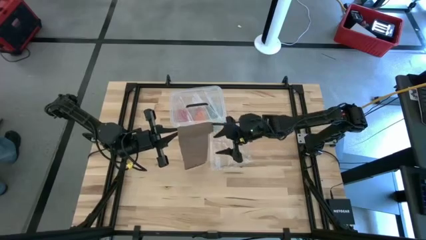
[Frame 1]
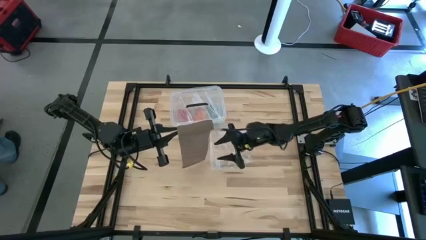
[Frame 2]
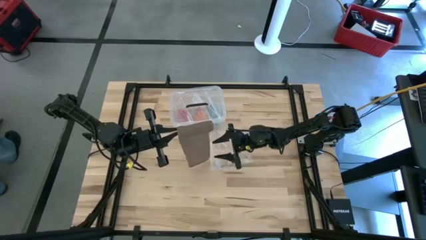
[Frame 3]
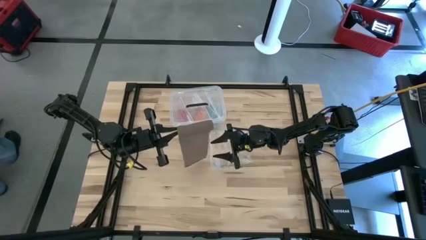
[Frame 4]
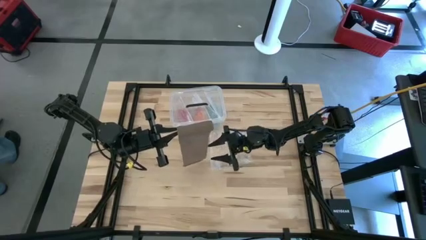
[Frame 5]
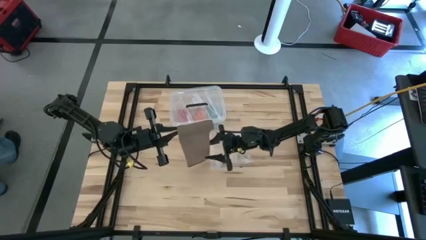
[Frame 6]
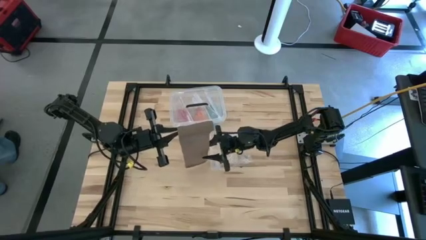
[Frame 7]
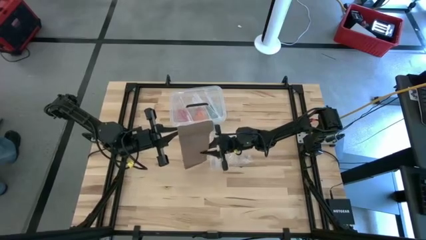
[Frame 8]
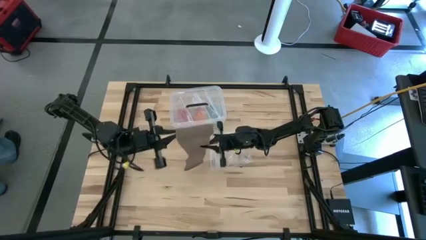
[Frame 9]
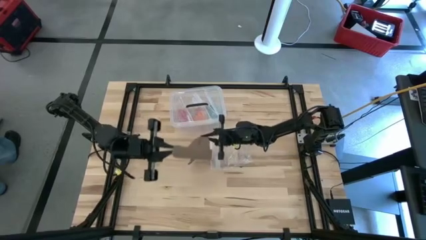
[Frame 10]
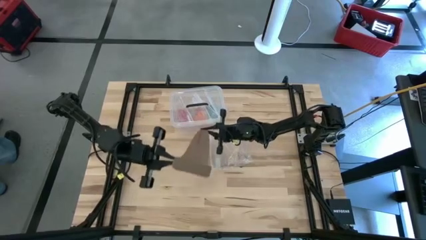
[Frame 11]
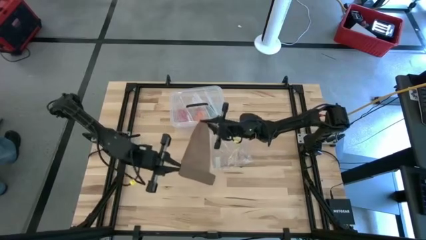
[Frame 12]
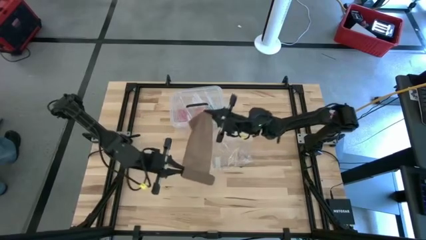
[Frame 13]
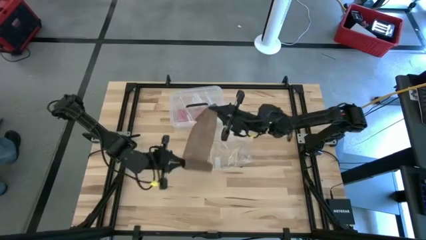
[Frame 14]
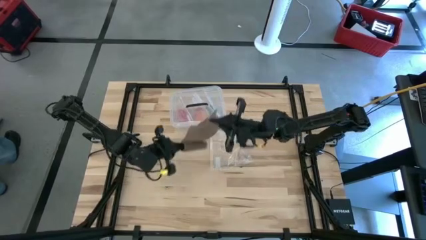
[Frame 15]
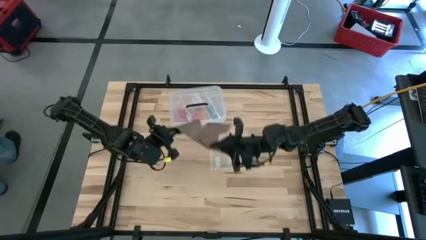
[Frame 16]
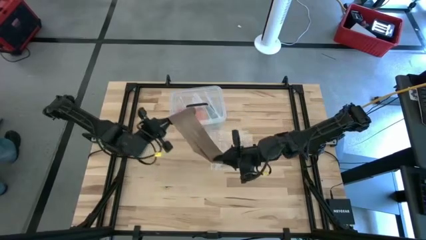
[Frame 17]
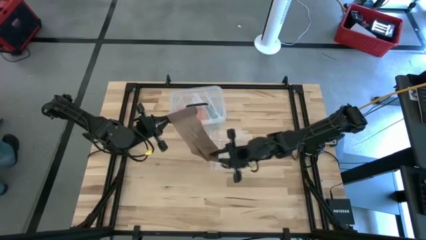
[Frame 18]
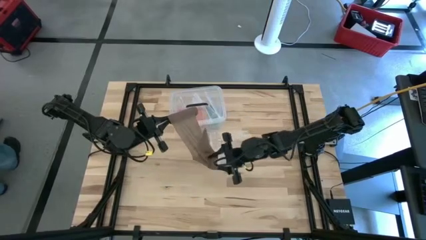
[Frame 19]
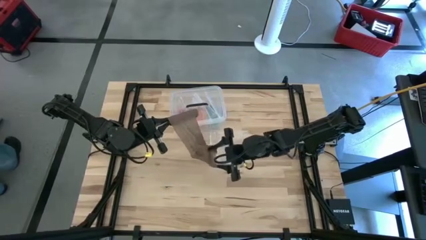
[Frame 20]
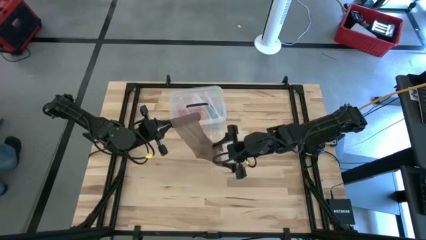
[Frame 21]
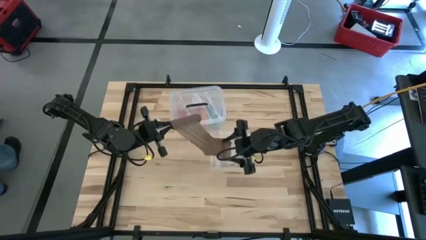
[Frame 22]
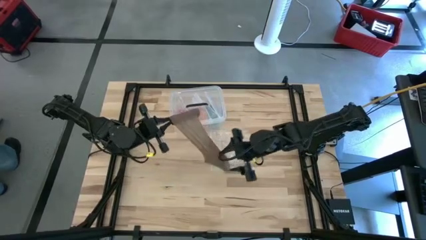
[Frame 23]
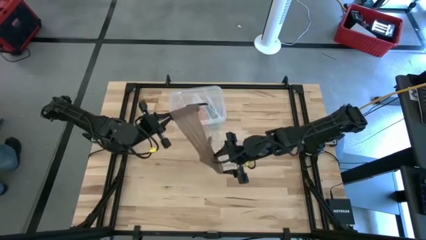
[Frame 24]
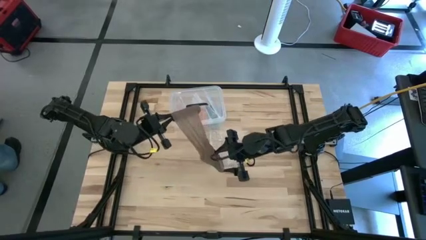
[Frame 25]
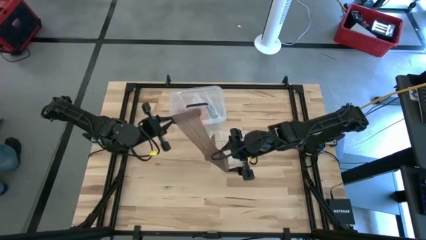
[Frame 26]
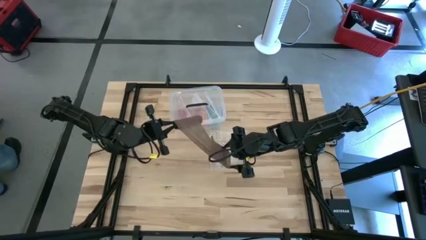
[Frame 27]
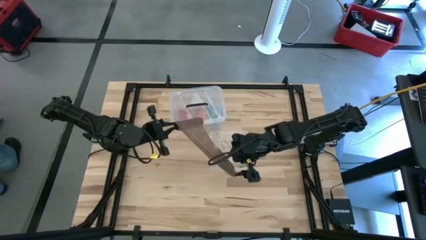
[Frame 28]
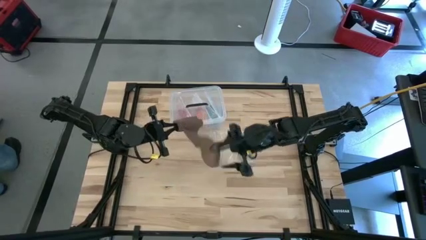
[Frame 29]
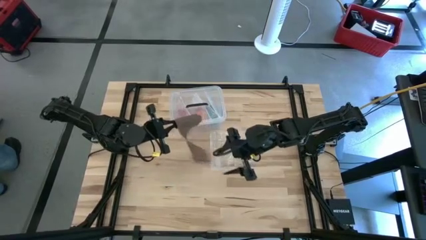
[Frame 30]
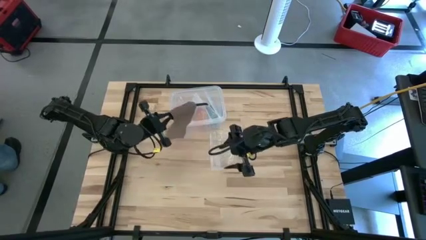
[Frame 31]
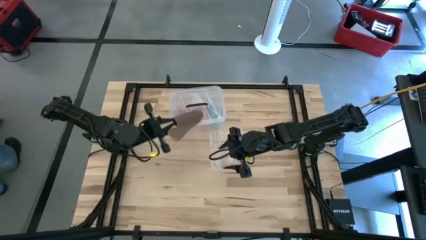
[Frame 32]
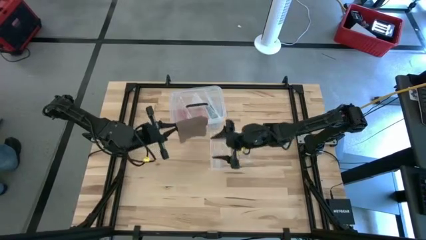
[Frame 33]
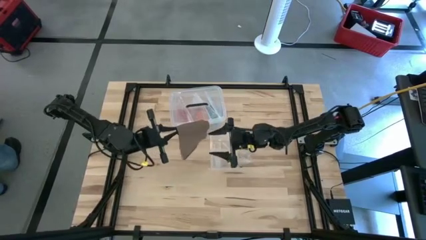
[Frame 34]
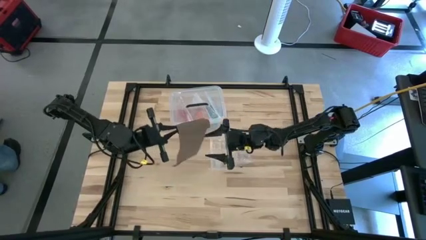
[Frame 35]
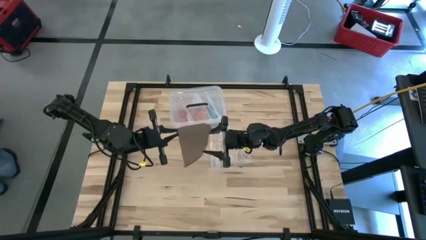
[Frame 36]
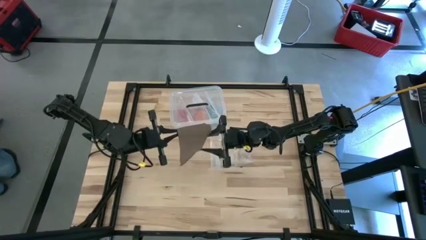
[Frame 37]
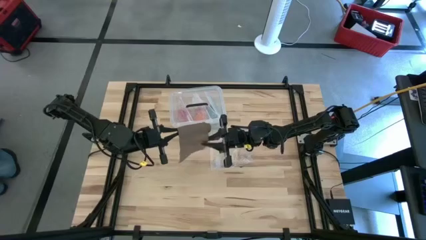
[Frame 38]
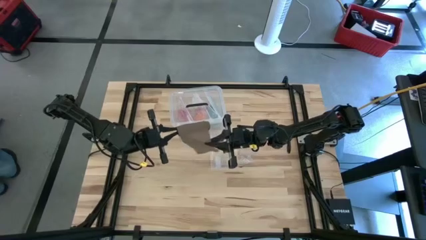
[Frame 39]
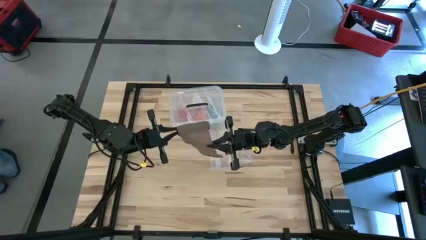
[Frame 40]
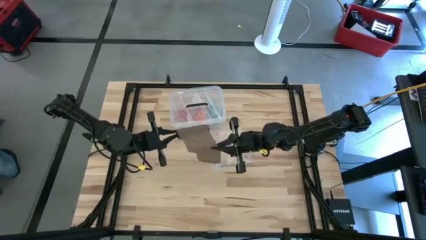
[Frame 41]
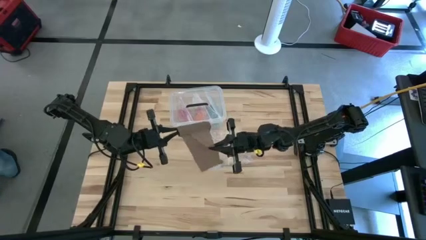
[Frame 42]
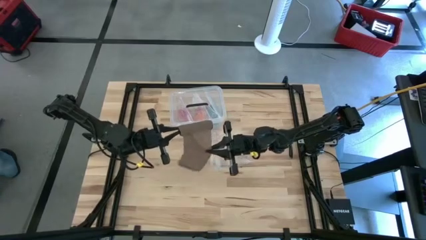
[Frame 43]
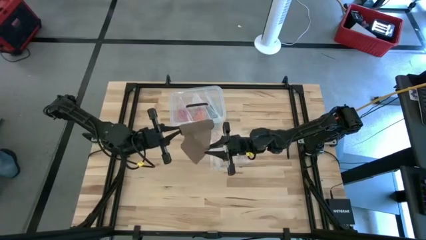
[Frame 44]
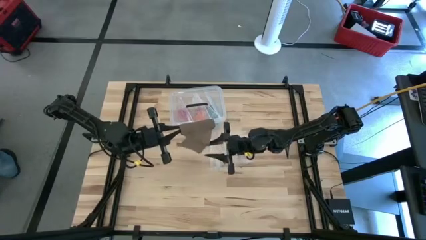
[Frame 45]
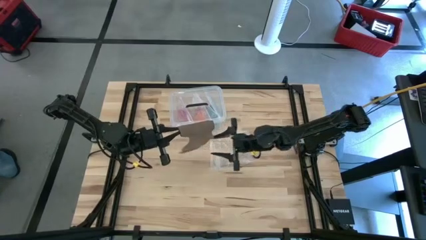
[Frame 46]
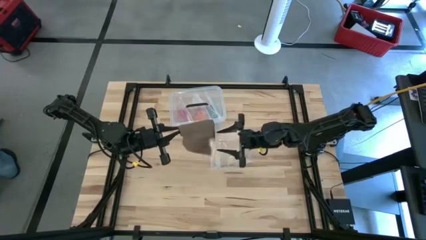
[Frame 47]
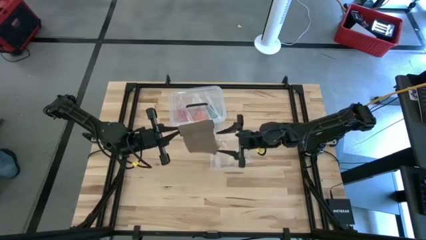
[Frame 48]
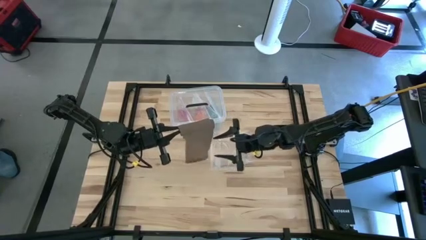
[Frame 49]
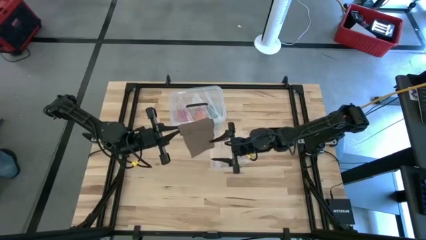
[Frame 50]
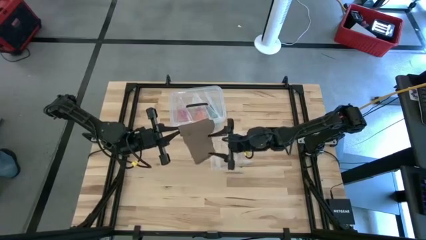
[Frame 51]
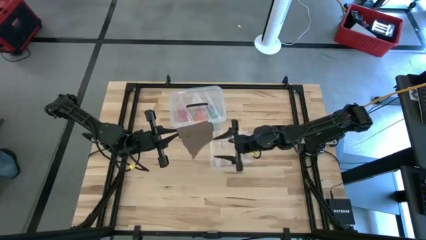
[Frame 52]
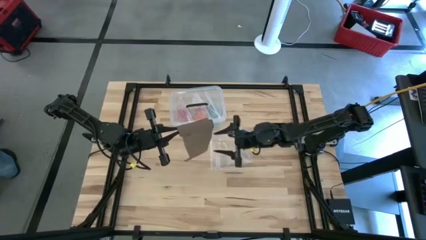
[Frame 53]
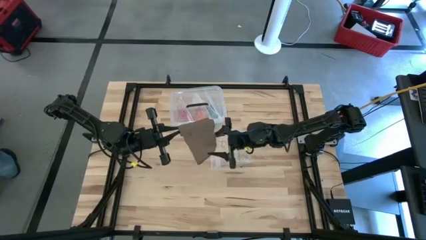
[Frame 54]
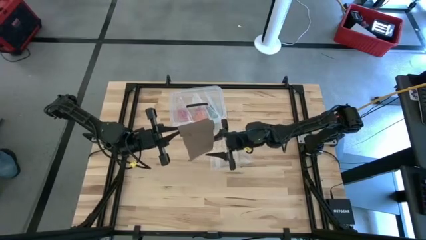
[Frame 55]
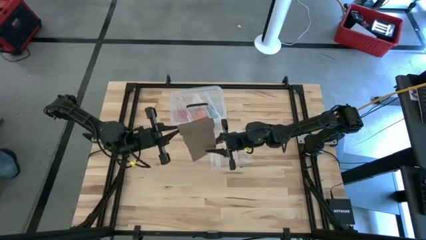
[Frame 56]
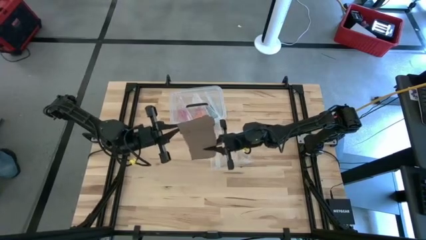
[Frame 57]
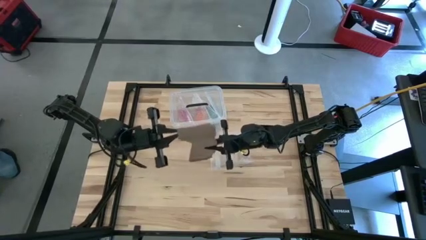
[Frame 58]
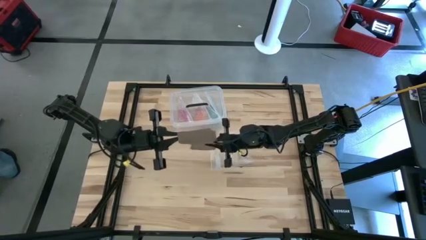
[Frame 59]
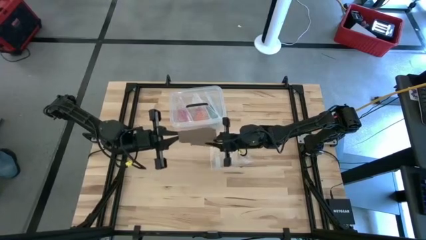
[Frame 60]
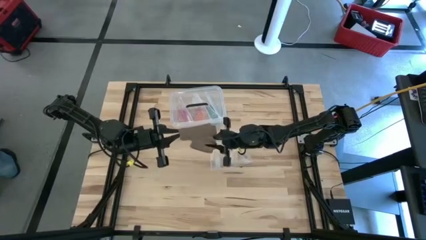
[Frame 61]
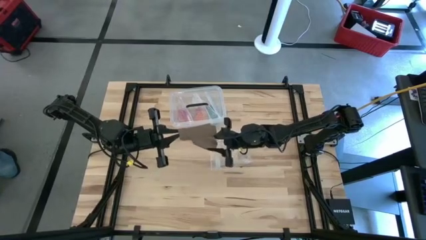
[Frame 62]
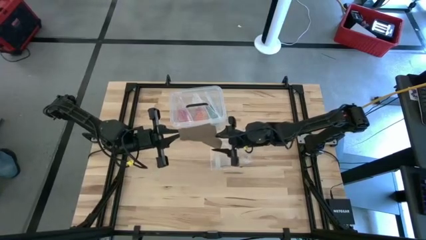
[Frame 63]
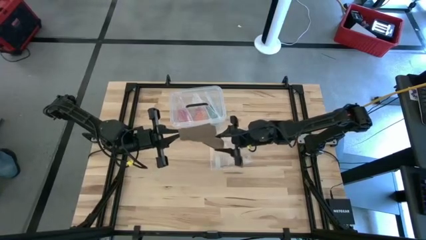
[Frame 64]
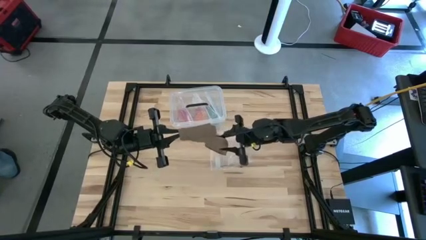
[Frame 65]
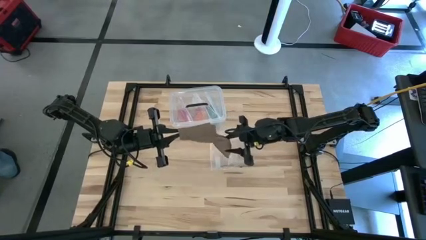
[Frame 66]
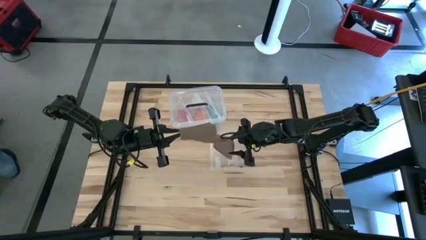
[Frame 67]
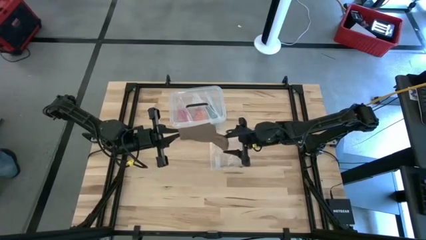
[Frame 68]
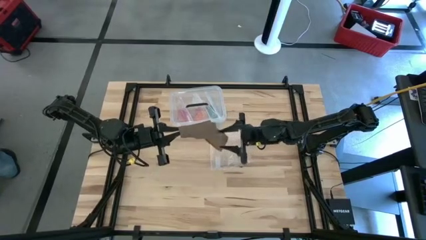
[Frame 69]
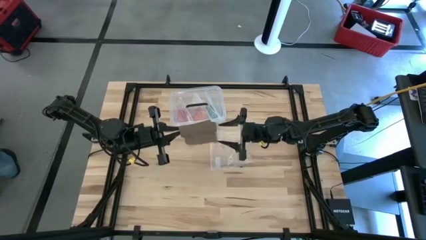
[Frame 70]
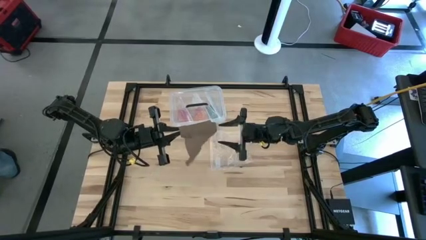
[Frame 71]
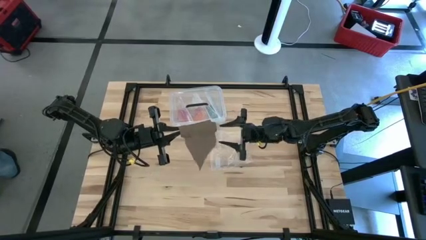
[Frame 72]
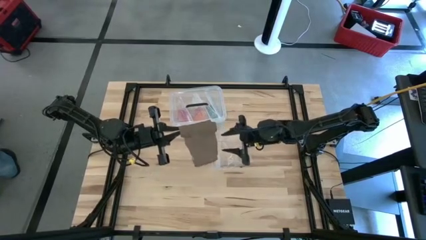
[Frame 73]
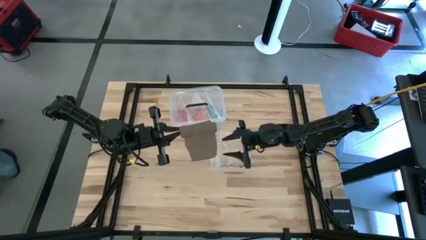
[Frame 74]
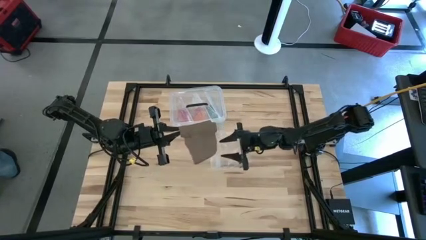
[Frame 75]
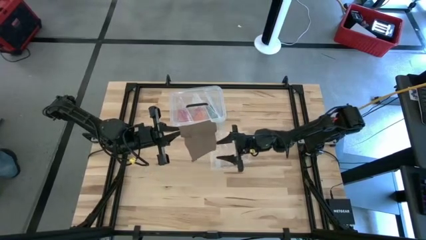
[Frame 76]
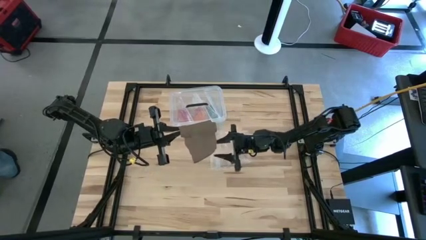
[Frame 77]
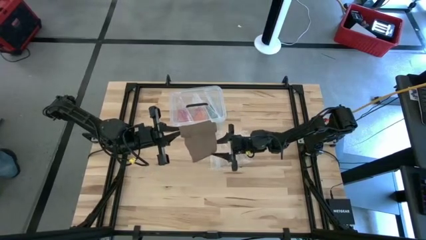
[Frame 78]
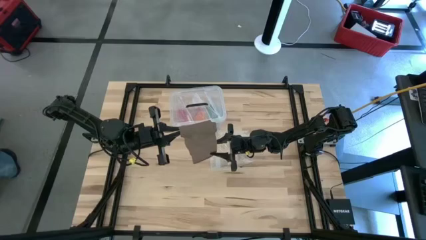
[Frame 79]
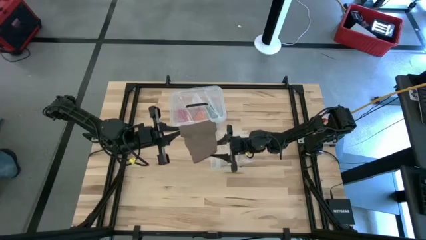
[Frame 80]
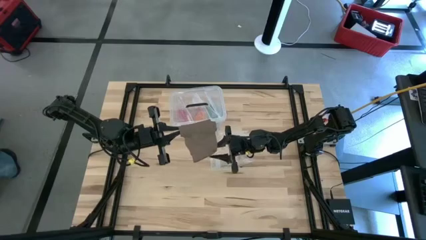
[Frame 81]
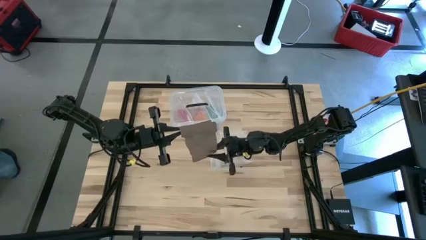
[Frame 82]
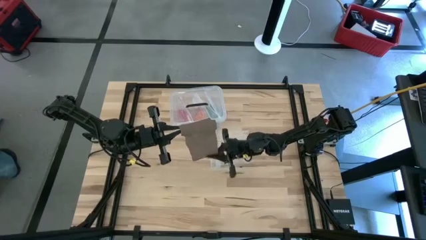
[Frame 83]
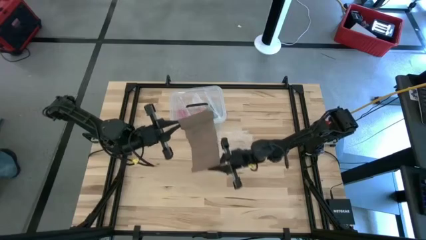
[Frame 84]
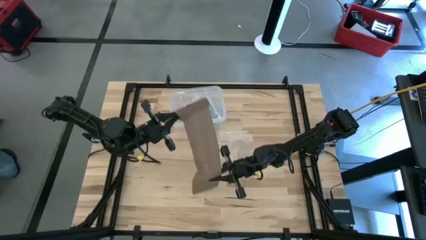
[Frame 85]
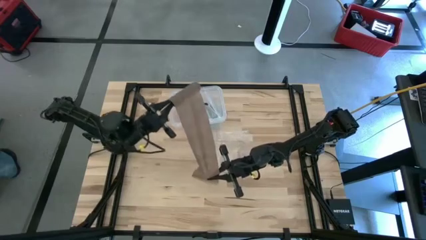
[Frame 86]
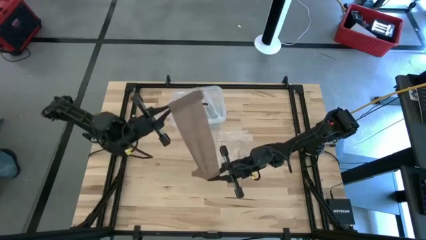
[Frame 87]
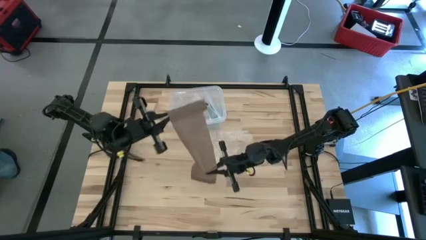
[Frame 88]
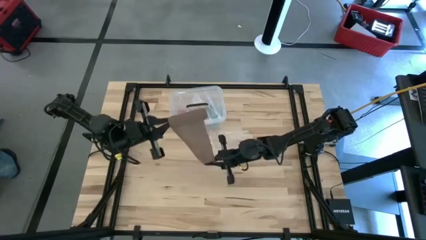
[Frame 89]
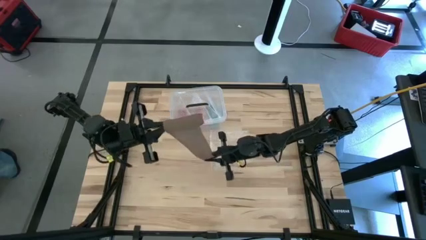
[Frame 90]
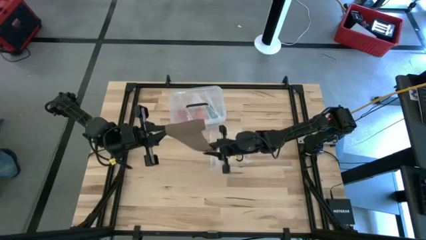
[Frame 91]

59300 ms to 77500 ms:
Task: Roll bandage
Roll the brown bandage
